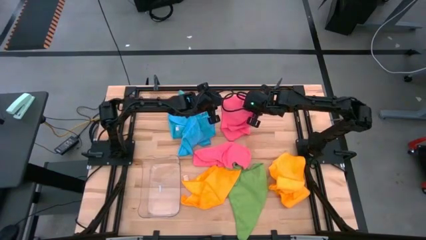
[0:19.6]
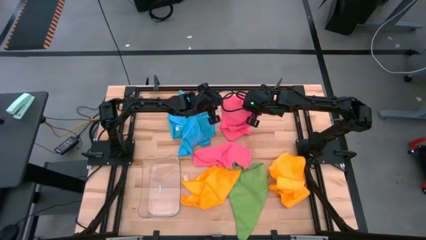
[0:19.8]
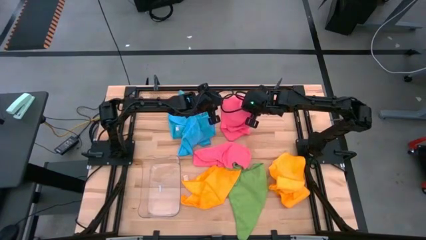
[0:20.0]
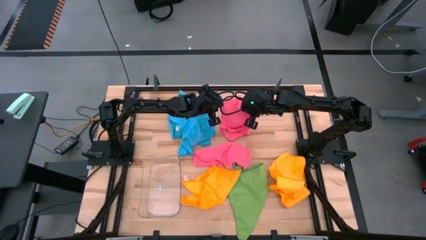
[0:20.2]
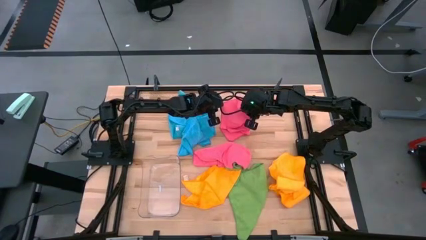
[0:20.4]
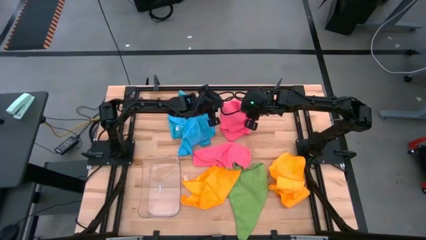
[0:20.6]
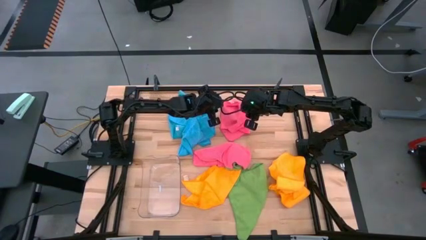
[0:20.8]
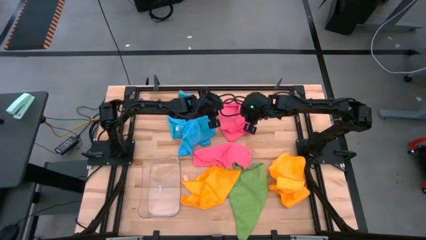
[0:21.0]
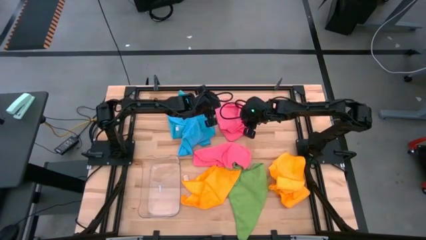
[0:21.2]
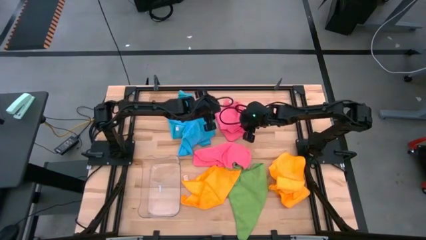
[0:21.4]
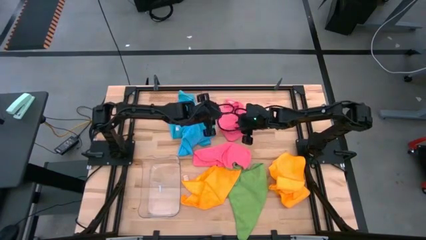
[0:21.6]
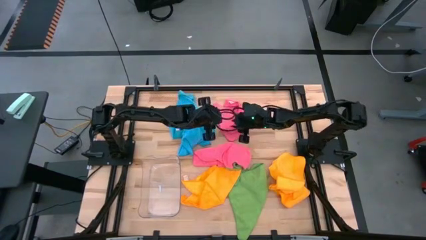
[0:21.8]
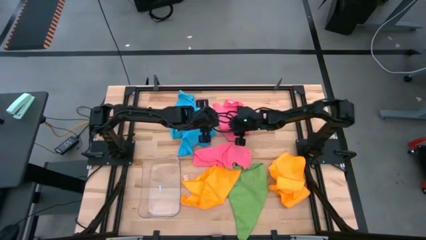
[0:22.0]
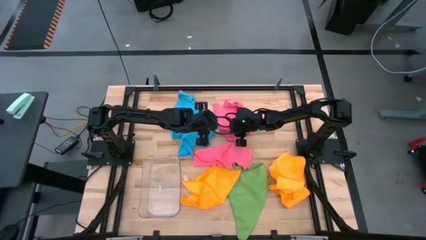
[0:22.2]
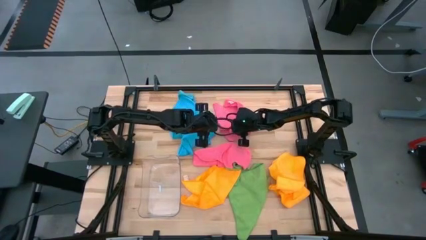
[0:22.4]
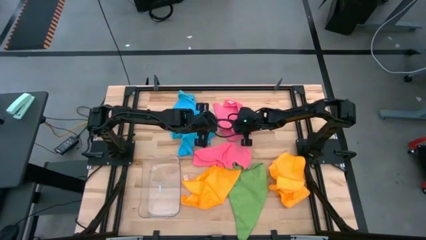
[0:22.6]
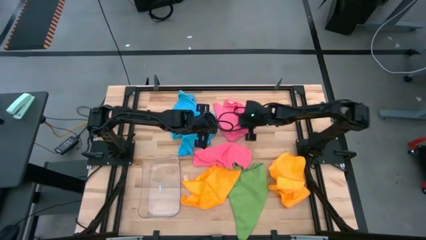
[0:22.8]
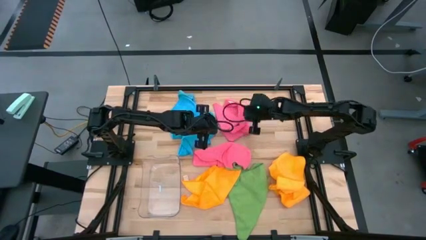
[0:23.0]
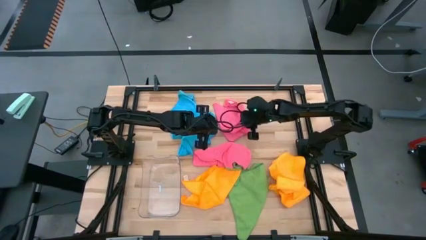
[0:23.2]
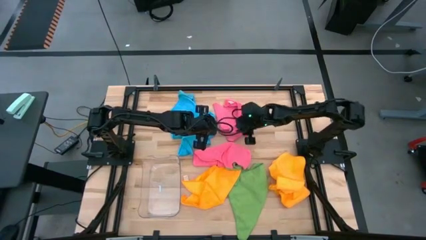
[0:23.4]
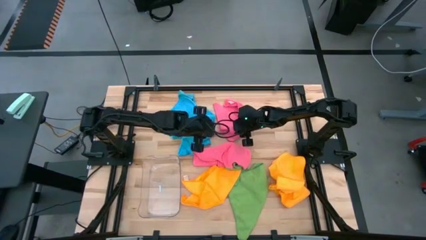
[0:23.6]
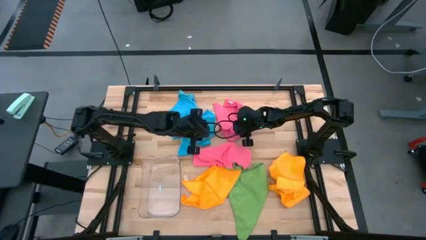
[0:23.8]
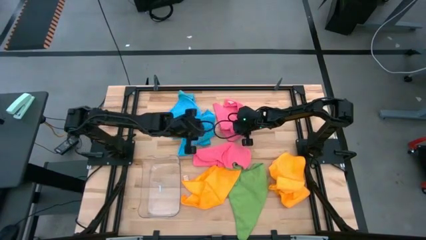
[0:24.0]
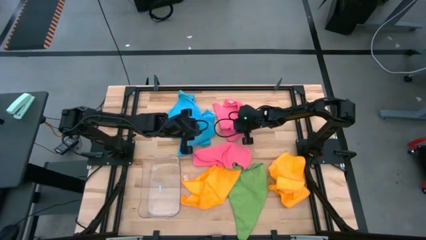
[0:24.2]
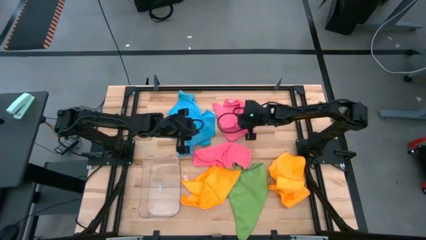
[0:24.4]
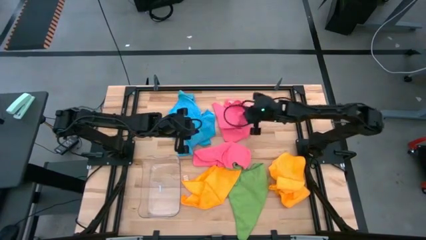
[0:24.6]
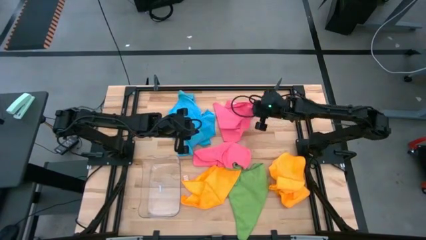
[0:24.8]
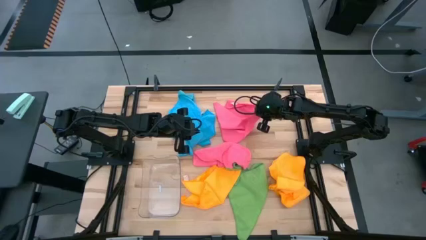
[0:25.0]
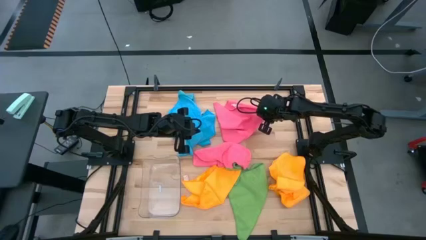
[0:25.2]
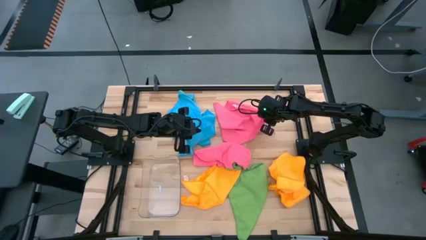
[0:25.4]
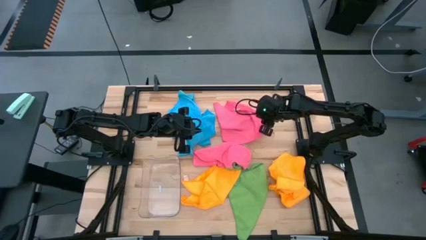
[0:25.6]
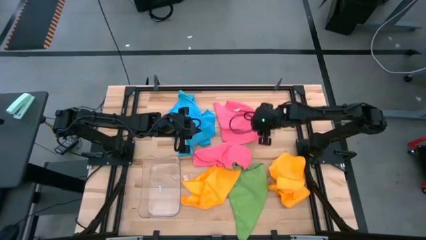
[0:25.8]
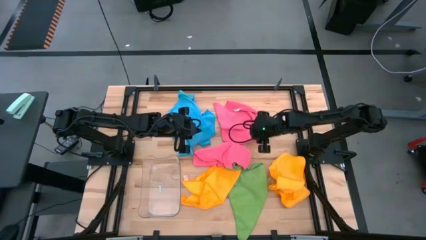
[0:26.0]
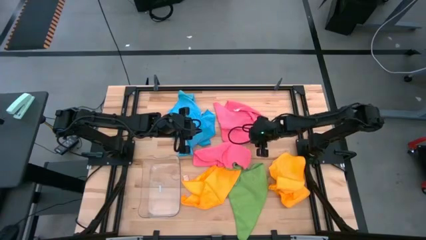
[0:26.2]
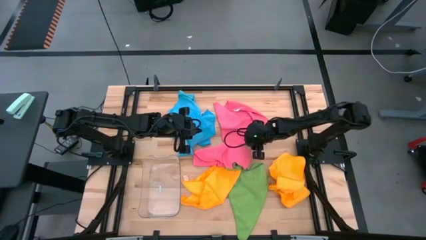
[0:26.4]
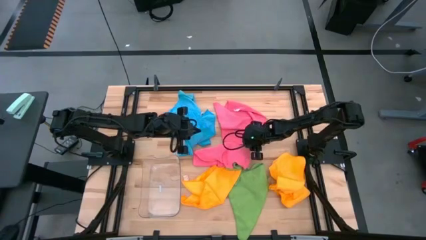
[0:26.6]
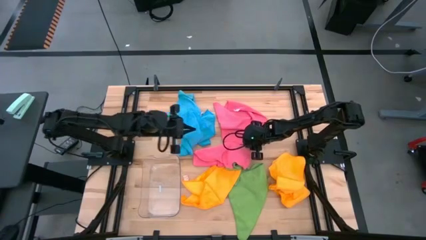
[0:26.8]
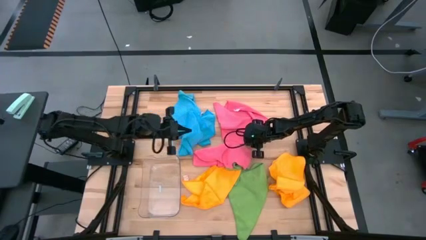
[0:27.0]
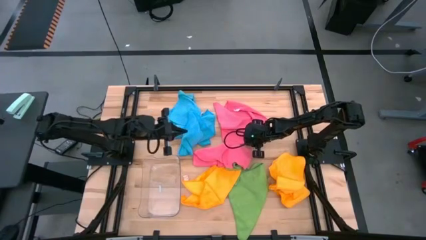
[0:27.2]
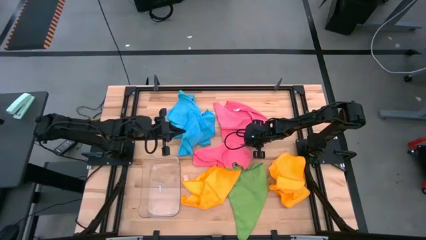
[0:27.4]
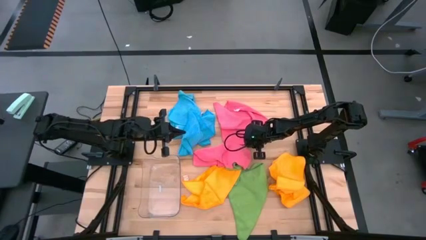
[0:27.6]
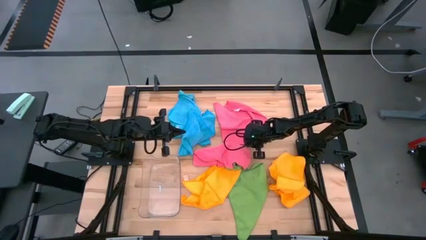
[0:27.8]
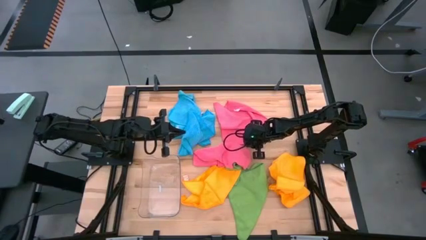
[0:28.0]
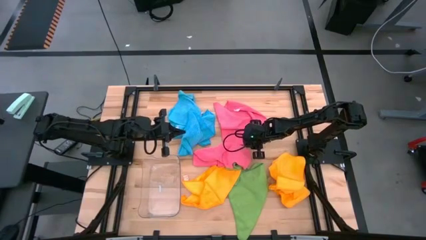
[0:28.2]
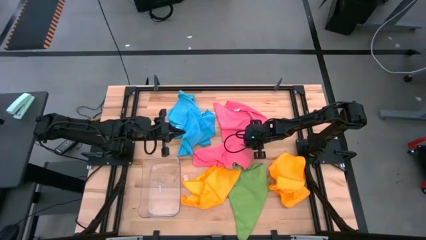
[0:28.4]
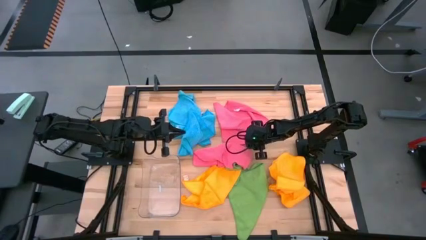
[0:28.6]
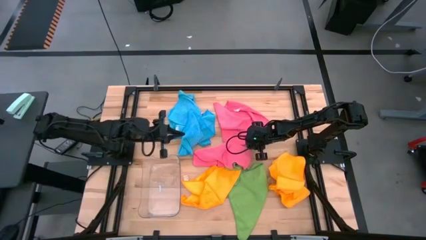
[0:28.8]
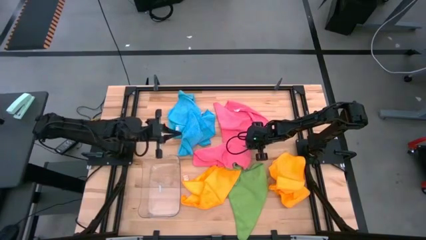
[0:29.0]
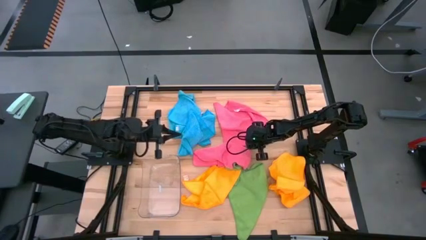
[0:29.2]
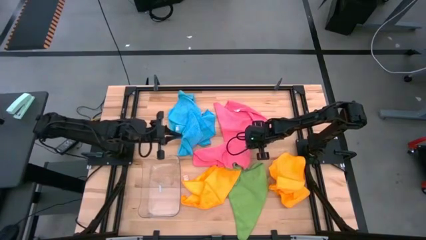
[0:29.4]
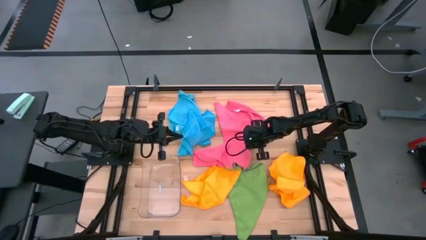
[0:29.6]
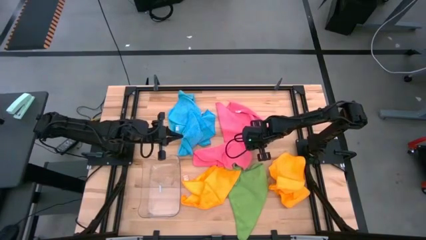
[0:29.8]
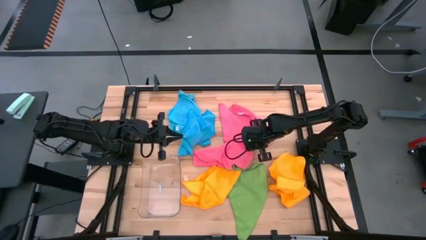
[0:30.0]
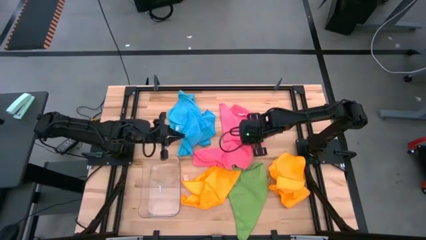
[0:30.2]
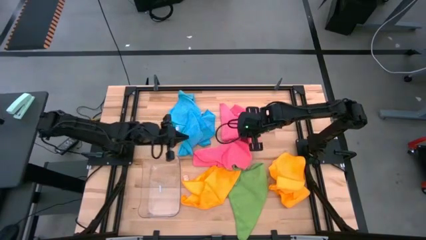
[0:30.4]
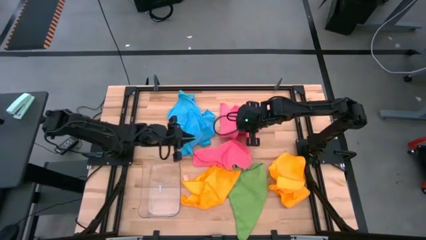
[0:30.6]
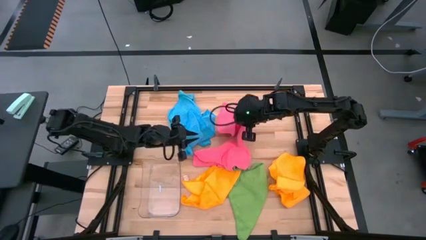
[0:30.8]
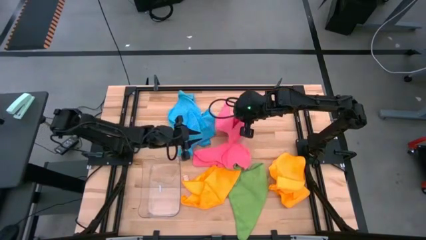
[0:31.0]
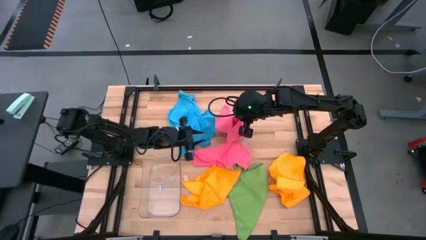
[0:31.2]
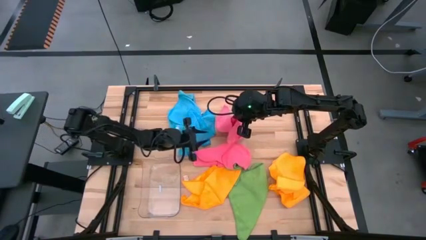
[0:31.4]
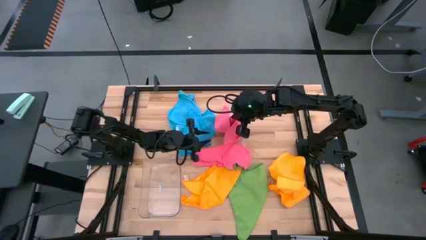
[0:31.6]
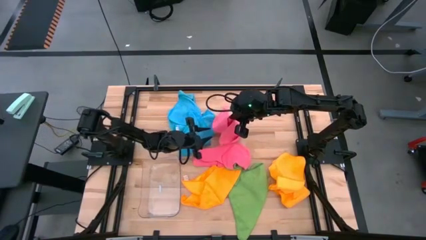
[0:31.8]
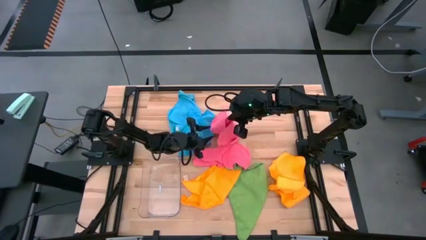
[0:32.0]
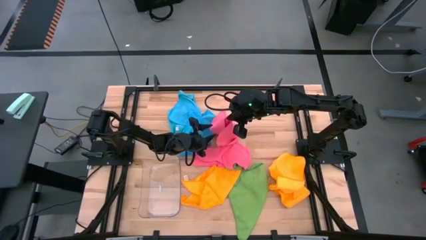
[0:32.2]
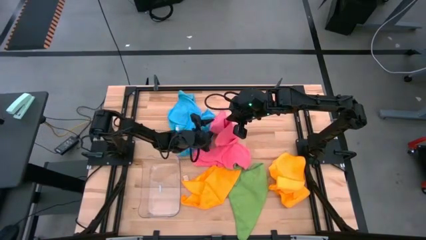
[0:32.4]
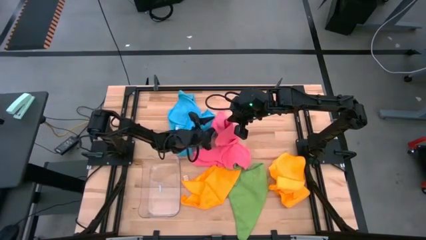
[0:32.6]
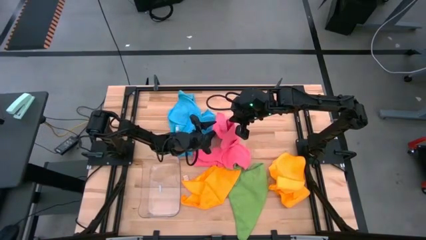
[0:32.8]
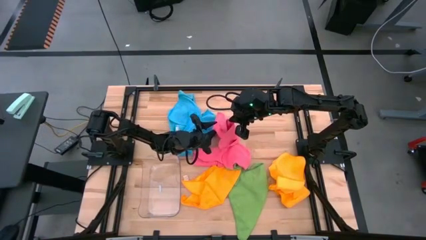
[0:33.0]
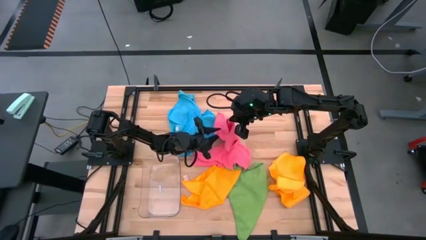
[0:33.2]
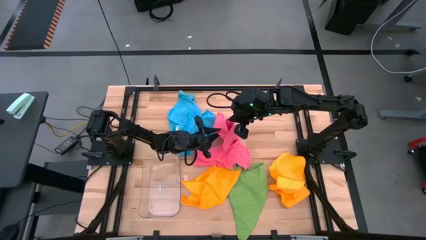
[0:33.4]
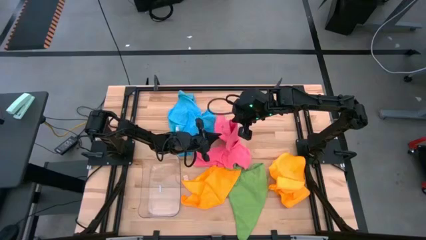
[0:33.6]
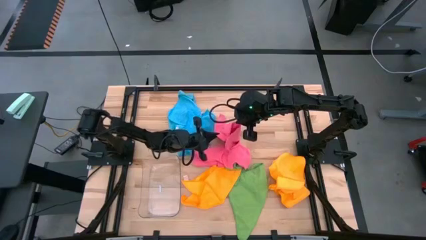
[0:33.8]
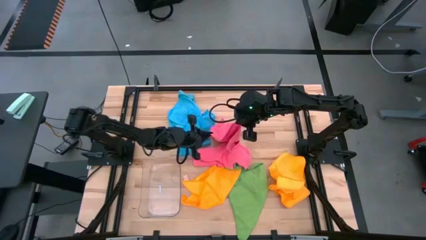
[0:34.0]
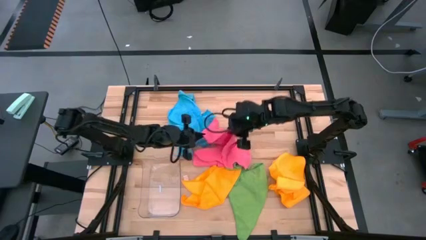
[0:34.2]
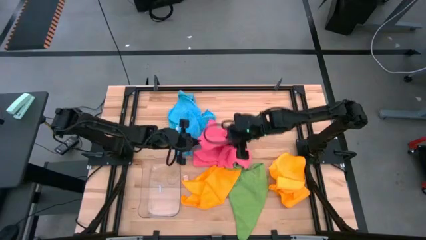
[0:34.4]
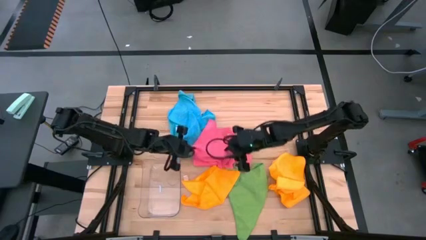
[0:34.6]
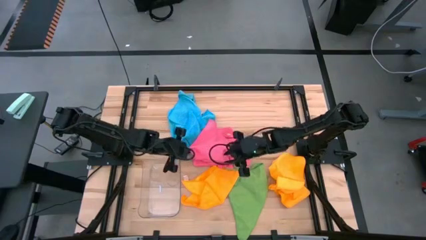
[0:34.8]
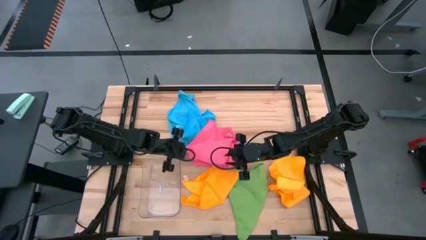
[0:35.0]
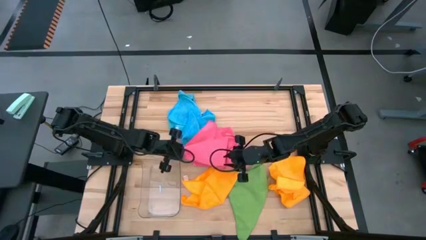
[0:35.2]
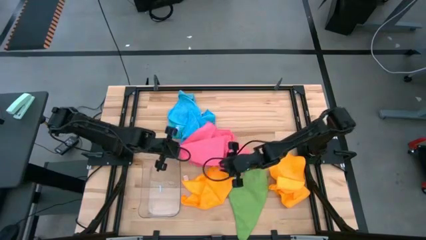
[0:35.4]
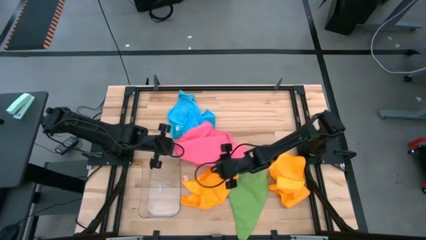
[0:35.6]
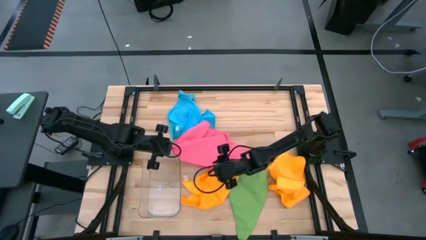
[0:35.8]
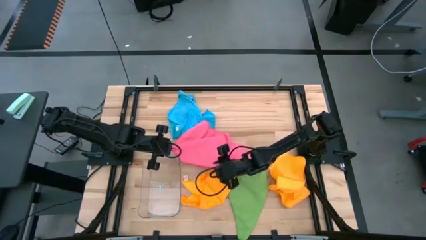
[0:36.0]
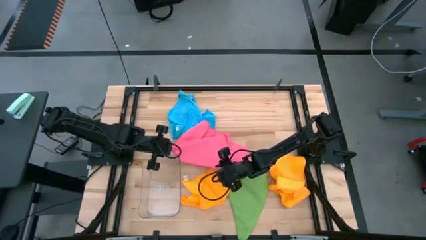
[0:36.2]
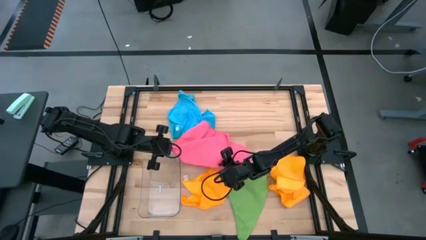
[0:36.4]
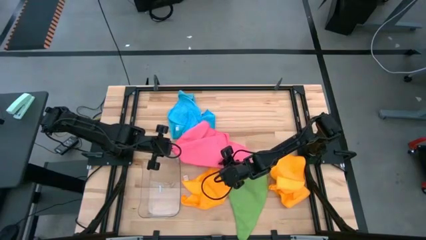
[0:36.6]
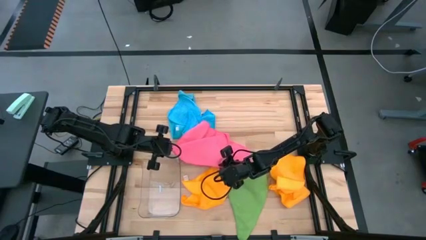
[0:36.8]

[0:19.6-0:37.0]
Task: Fold microfiber towels
Fold the top pink microfiber cloth
